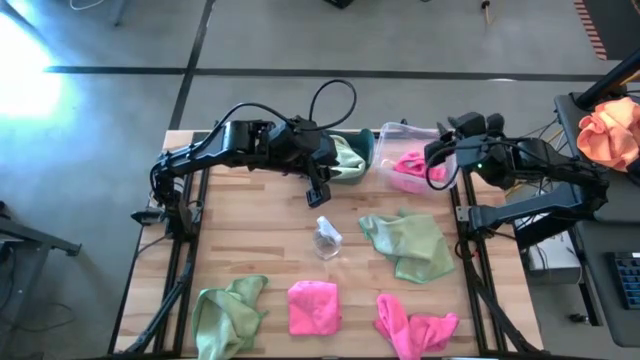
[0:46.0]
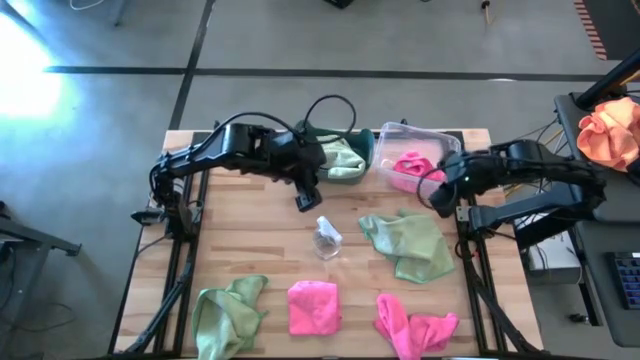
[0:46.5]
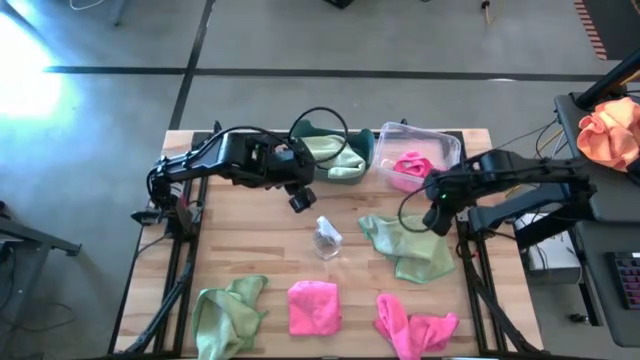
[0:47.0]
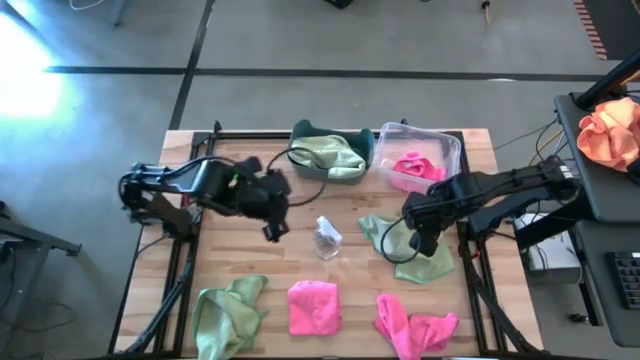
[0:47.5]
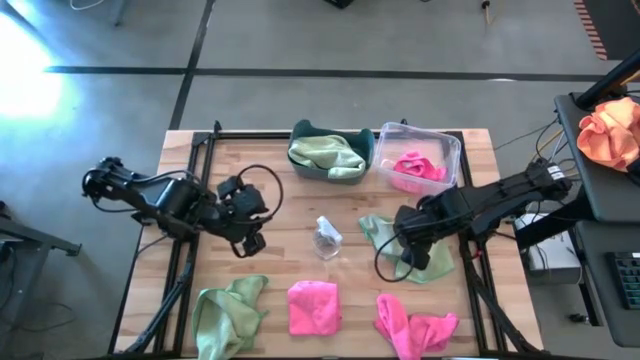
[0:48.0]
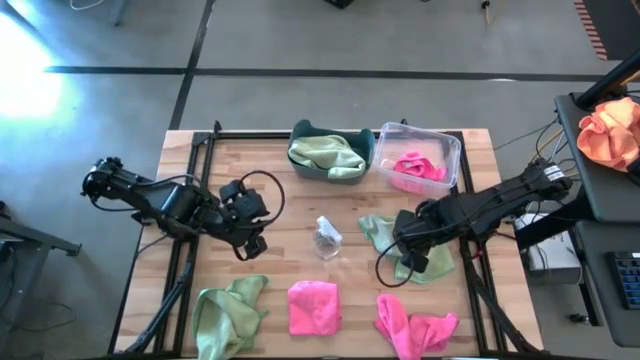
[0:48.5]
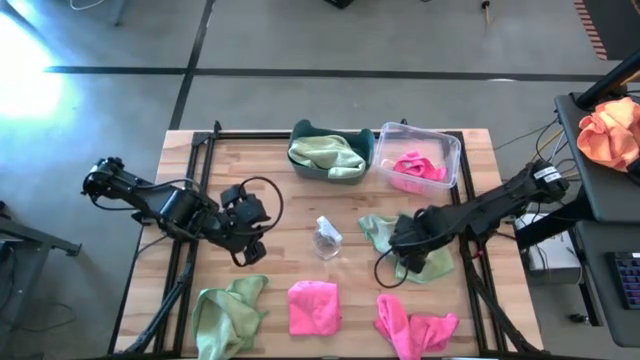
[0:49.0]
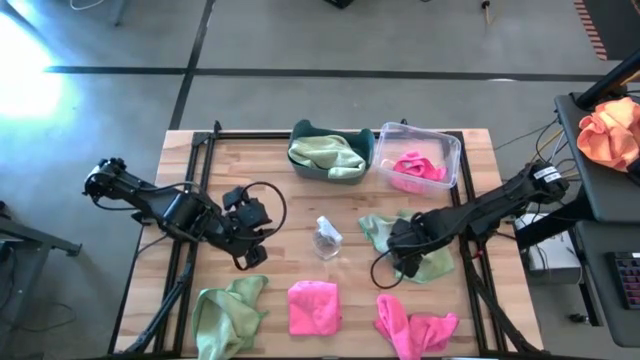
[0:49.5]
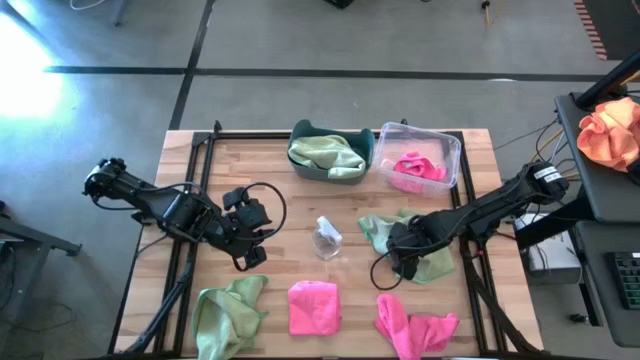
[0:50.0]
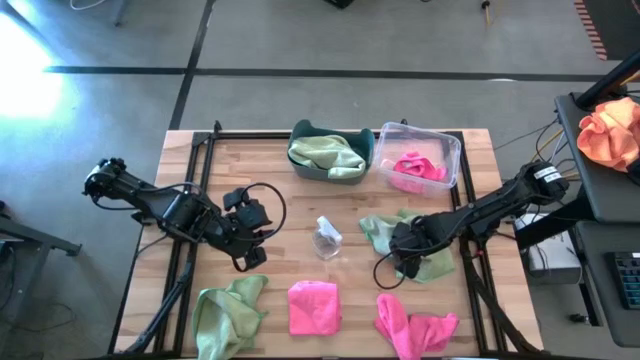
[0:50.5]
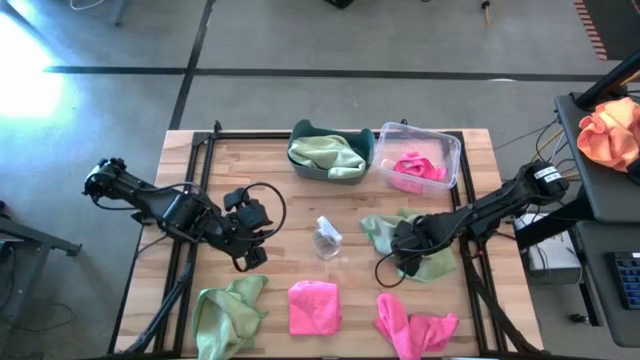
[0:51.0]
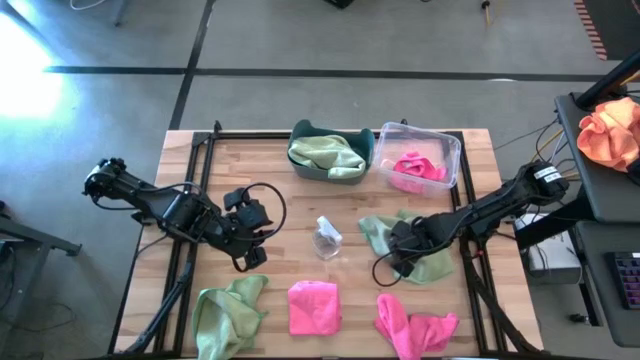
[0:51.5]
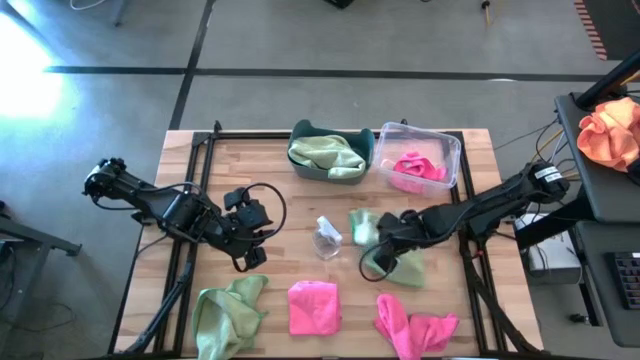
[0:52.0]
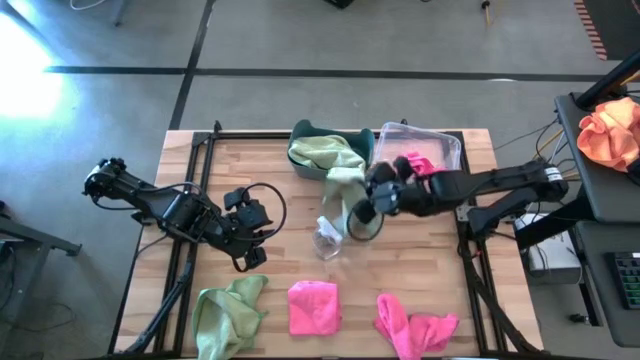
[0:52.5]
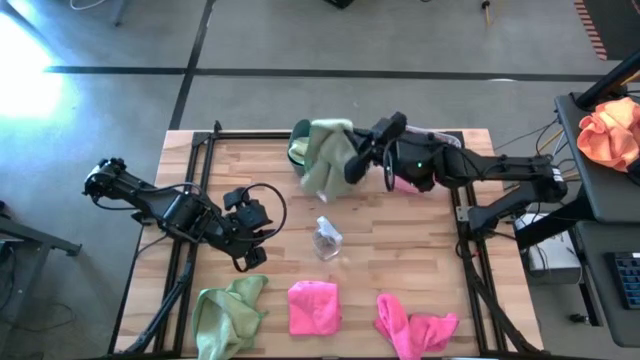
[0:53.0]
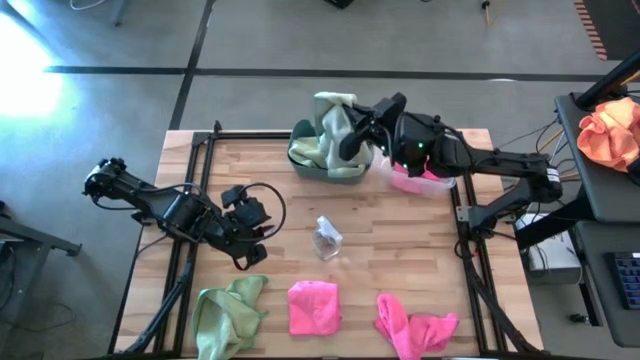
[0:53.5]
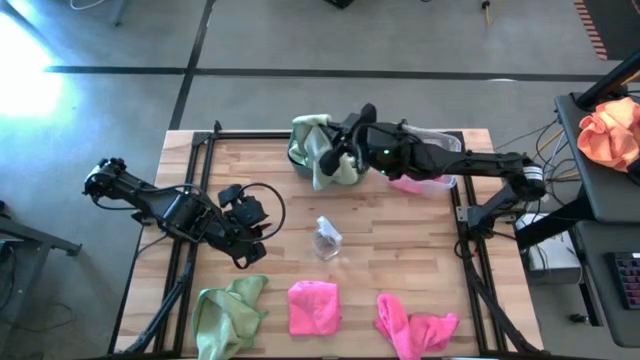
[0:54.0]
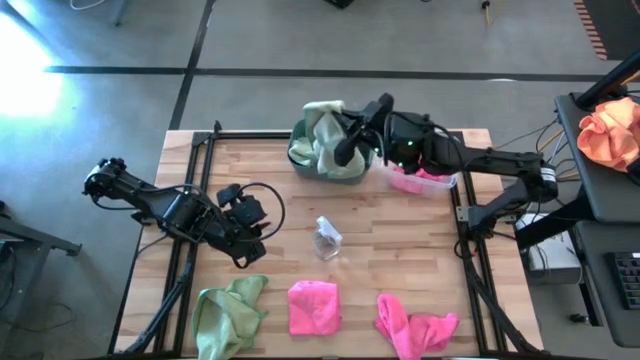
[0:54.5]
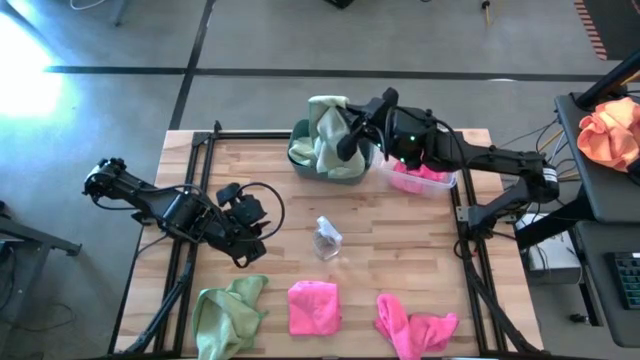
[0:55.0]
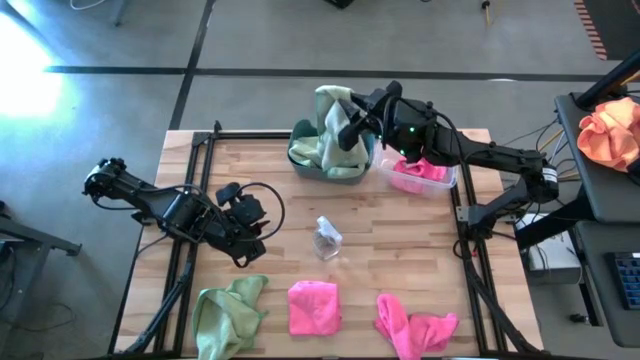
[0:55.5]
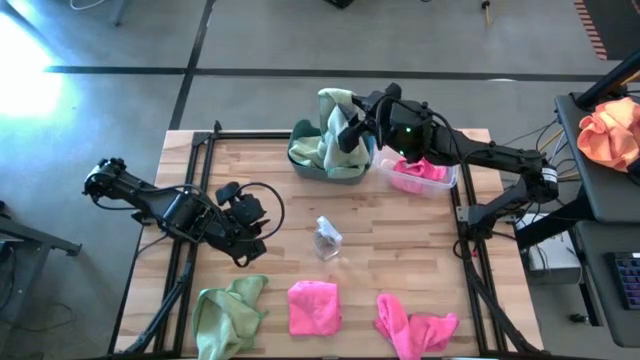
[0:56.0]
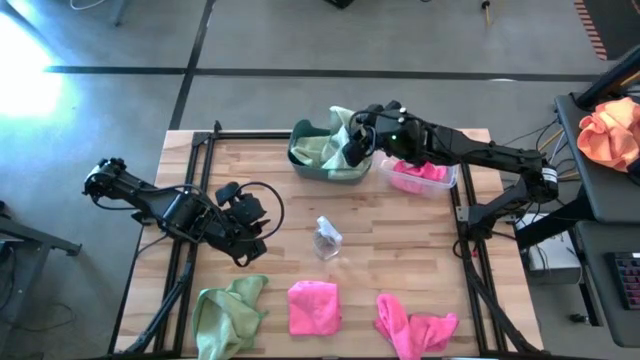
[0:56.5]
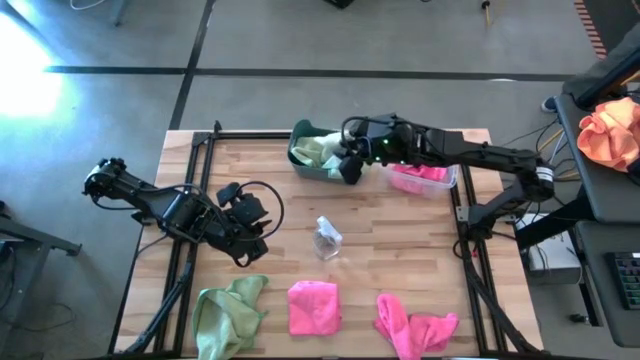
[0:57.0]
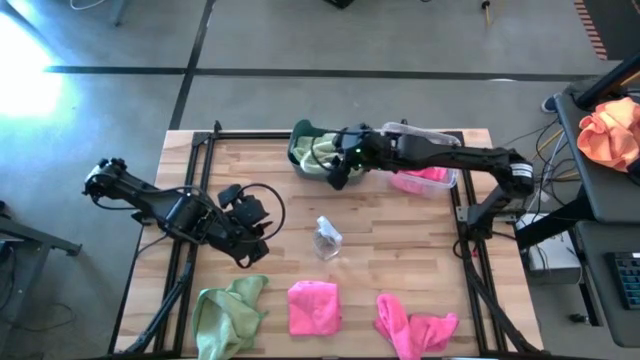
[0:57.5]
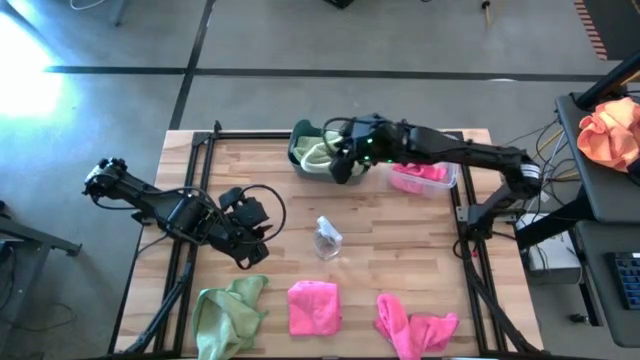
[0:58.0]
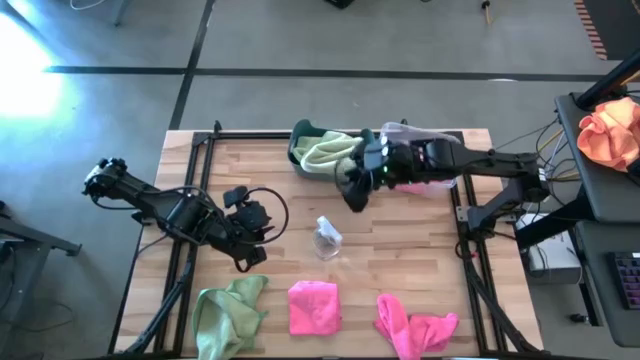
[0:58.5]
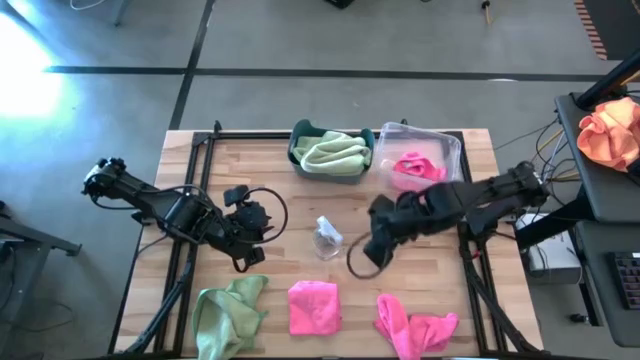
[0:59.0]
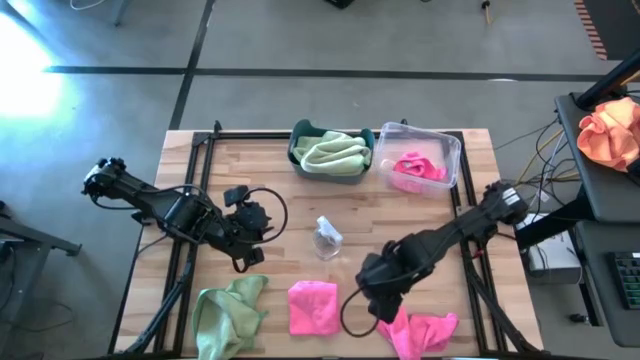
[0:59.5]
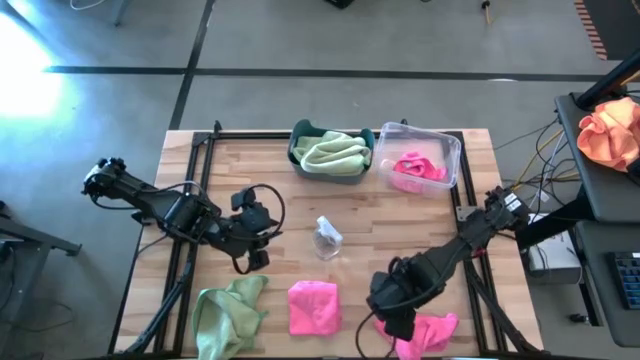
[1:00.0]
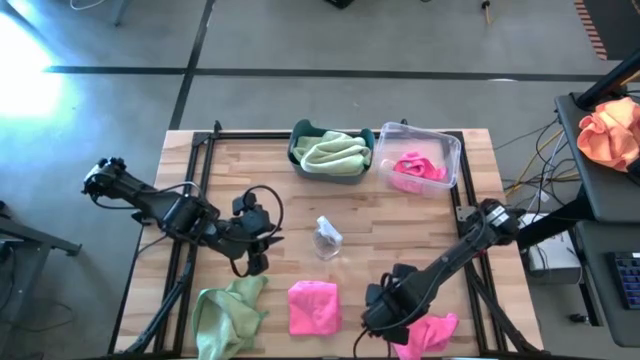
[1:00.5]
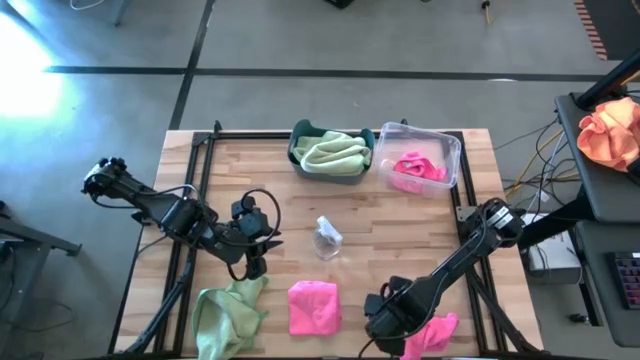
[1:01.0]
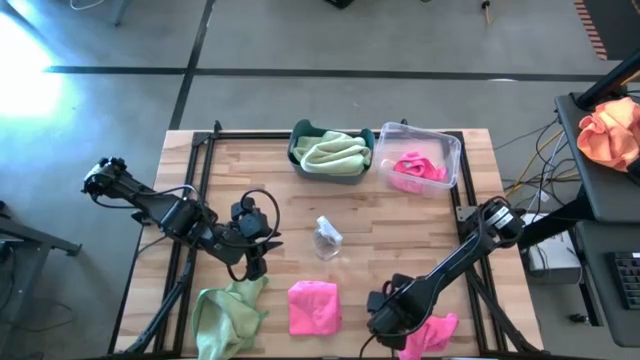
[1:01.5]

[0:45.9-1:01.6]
Task: Sort microfiber towel by color & place in baskets
Put the right green microfiber cloth into the blue bin

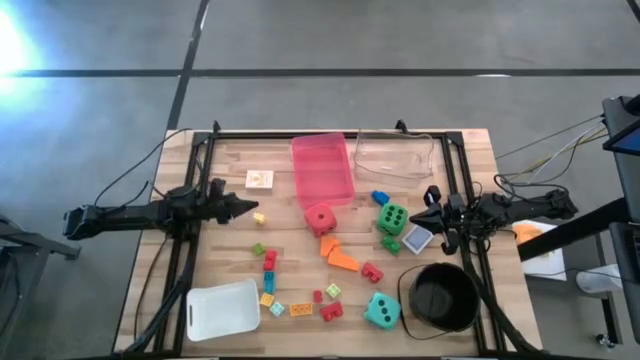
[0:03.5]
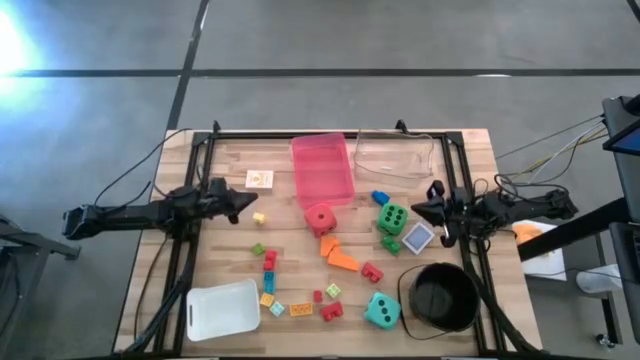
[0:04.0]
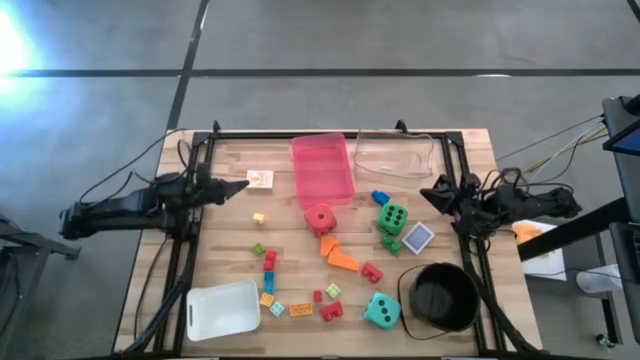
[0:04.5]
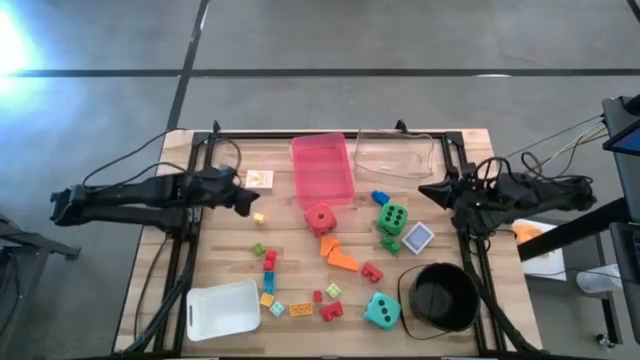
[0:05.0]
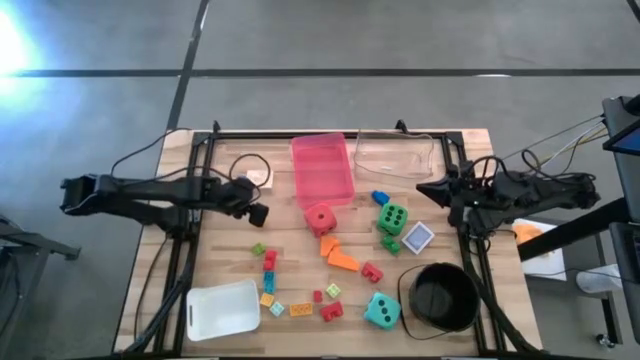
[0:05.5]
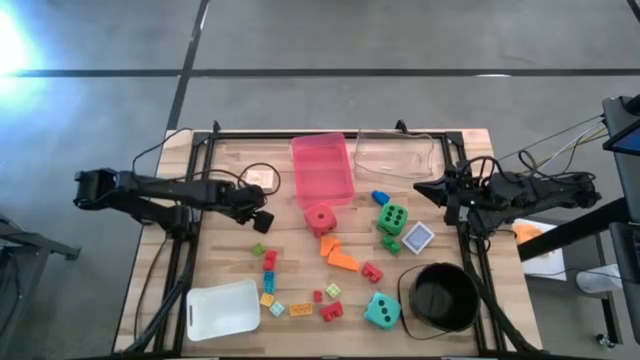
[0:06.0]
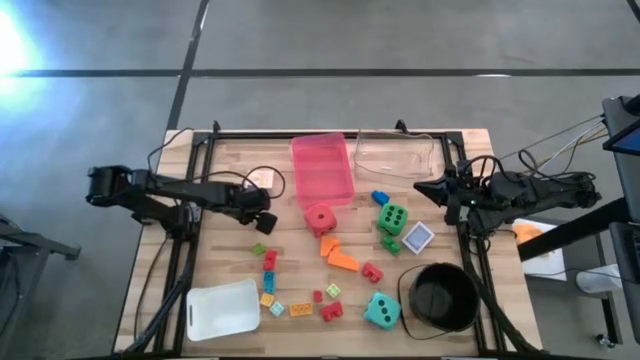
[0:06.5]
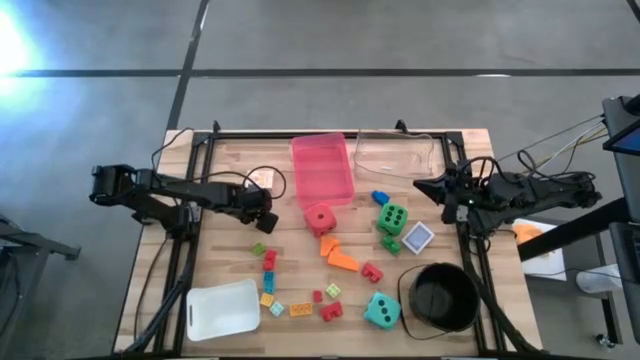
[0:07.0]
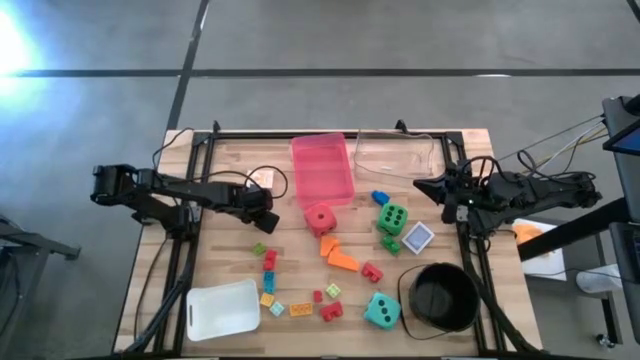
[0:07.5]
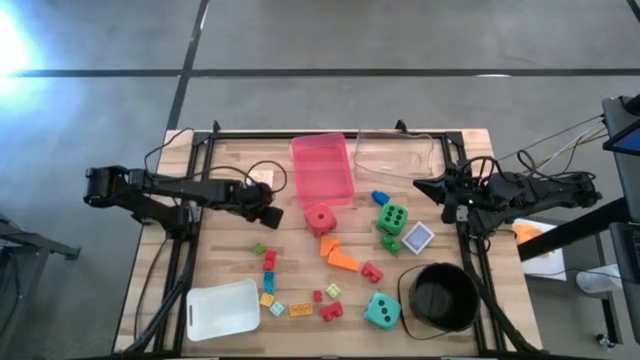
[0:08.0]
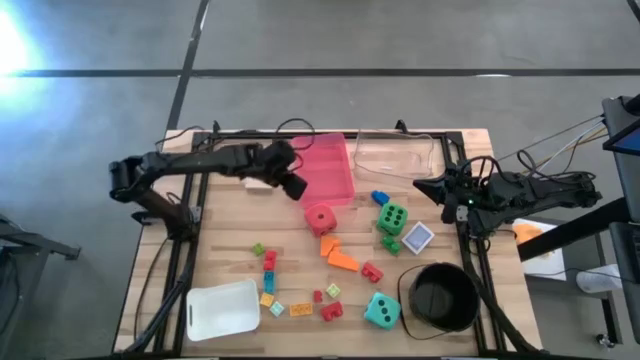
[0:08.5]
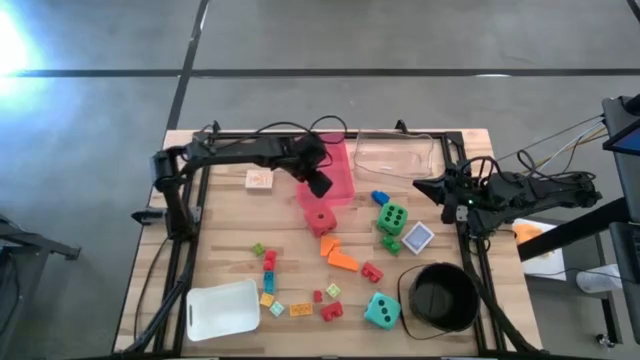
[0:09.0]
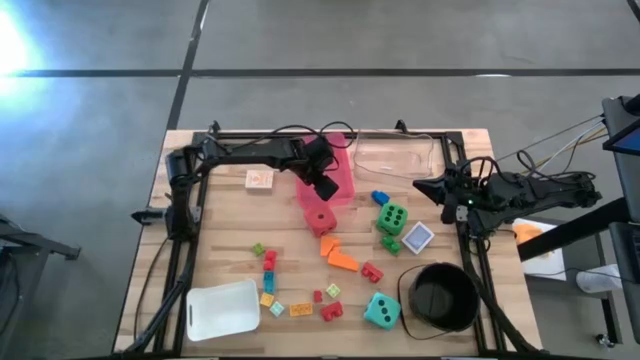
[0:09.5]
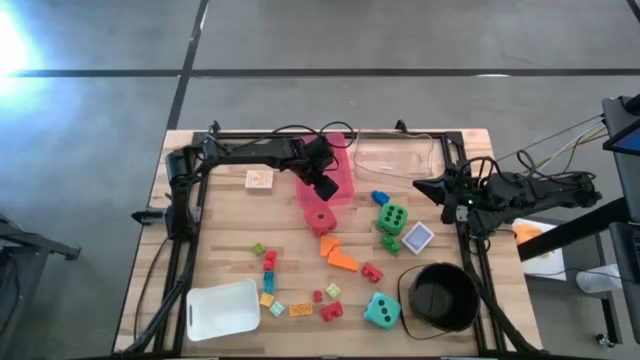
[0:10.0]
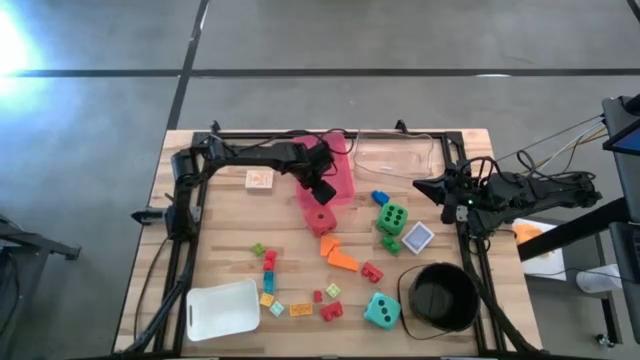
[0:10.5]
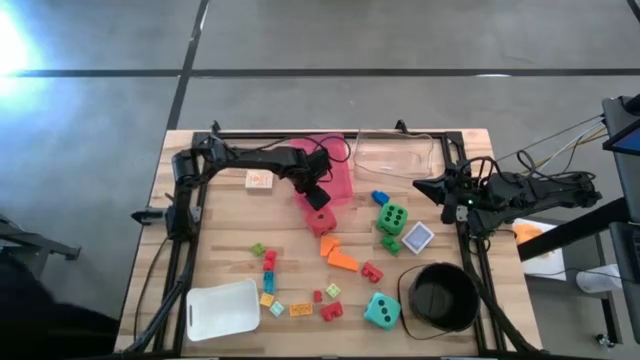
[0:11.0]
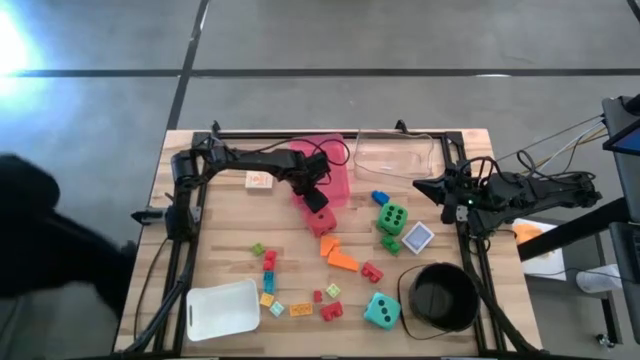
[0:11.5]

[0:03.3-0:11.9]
Task: Pick & Place Toys
Put the light yellow game piece into the red bin
